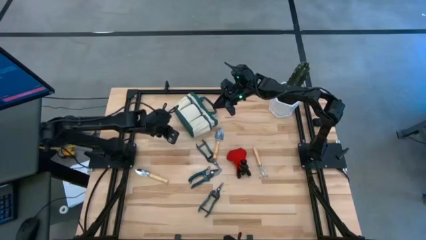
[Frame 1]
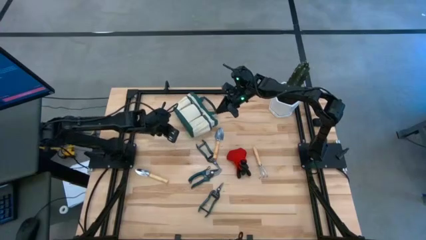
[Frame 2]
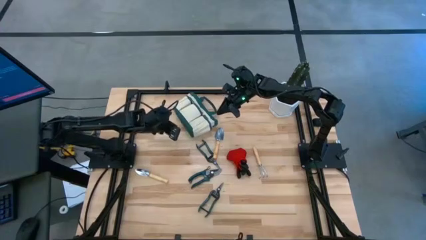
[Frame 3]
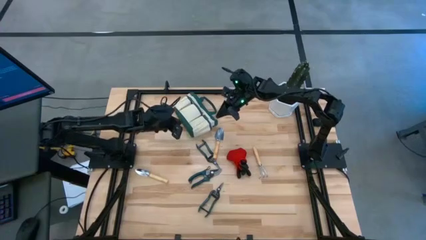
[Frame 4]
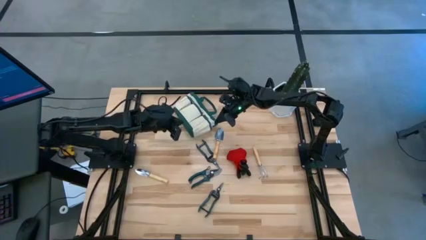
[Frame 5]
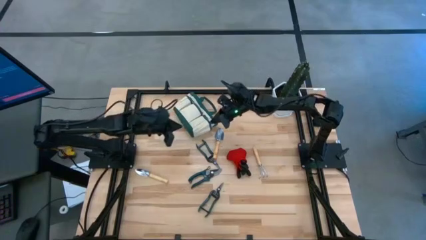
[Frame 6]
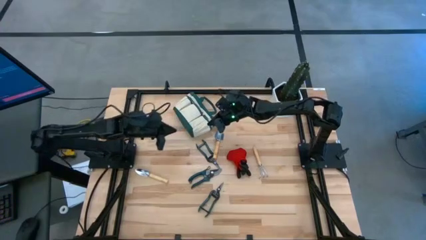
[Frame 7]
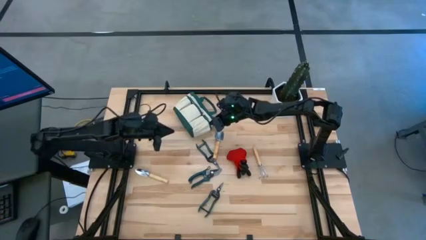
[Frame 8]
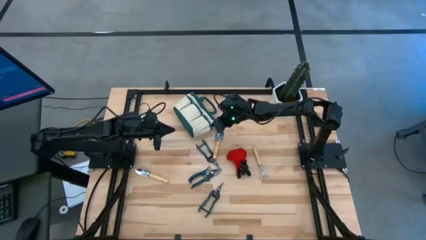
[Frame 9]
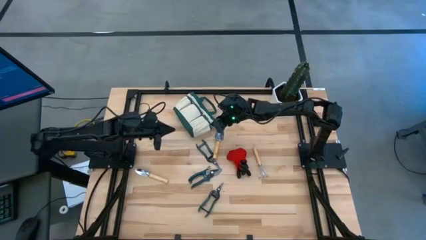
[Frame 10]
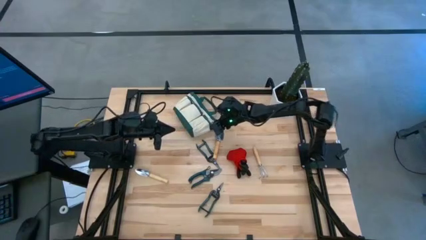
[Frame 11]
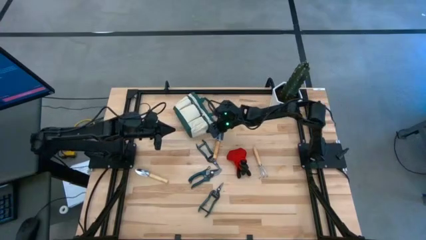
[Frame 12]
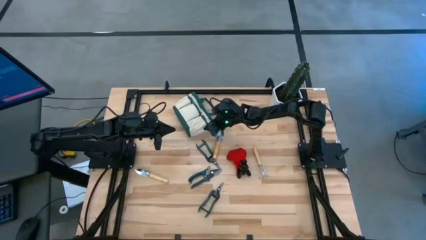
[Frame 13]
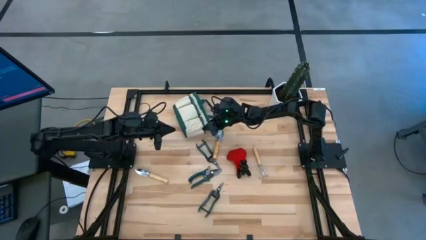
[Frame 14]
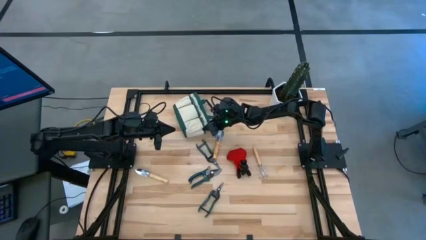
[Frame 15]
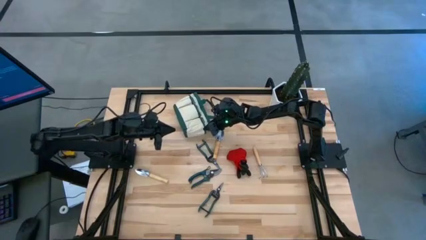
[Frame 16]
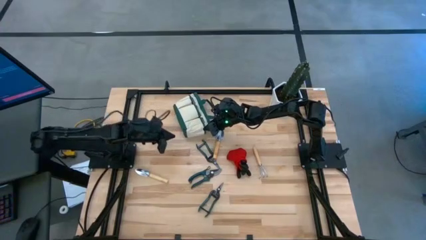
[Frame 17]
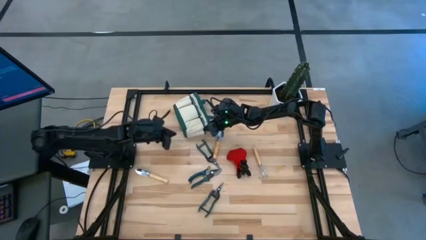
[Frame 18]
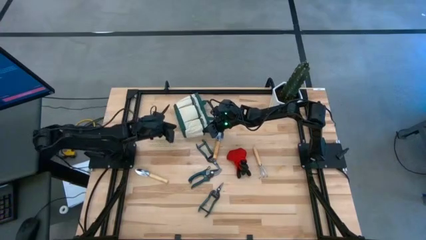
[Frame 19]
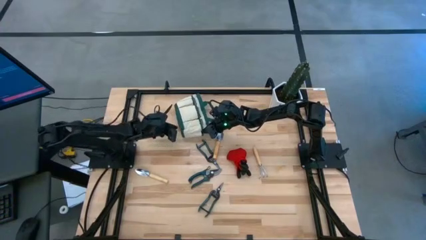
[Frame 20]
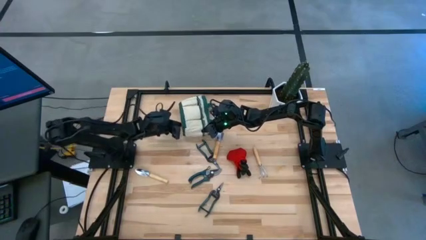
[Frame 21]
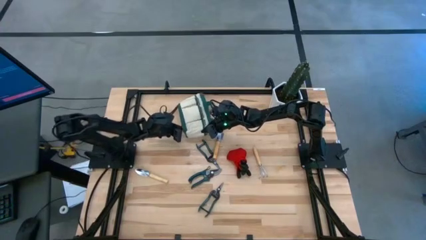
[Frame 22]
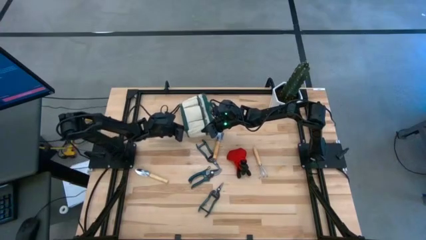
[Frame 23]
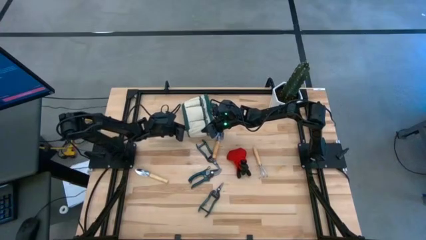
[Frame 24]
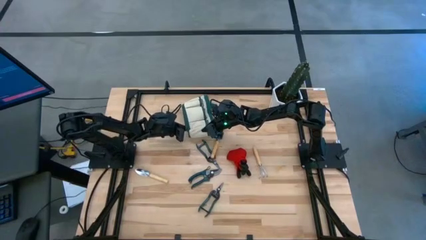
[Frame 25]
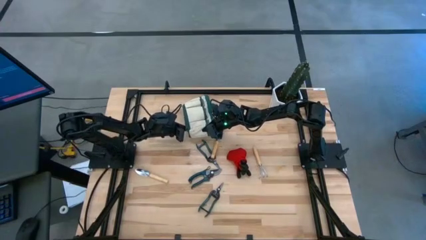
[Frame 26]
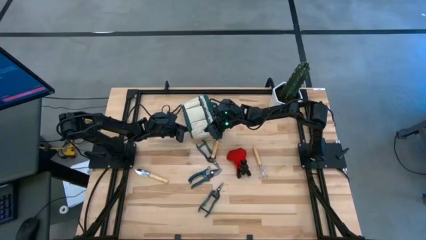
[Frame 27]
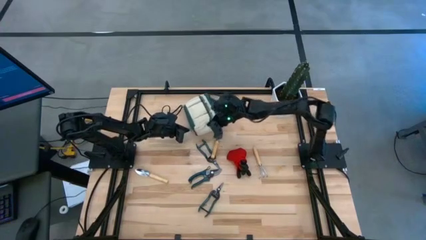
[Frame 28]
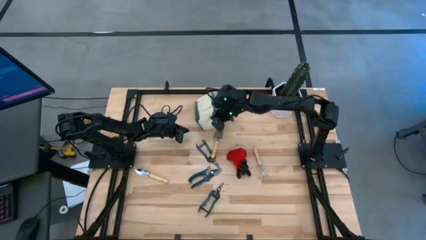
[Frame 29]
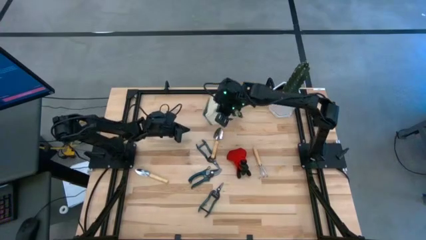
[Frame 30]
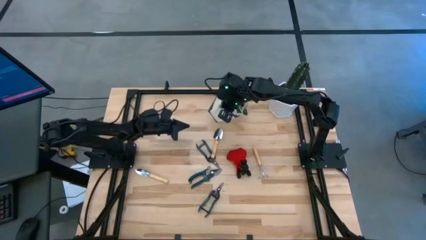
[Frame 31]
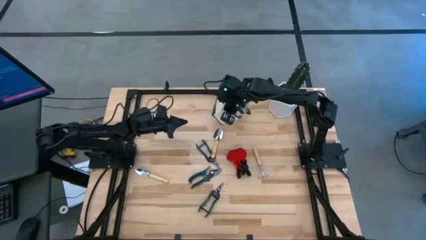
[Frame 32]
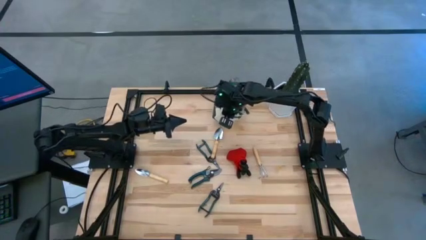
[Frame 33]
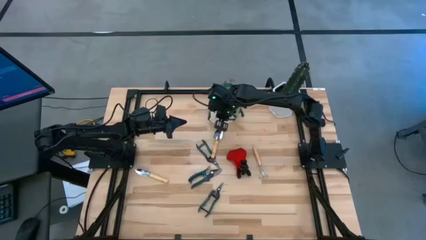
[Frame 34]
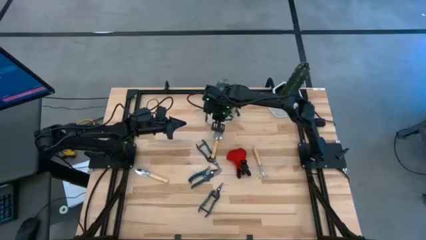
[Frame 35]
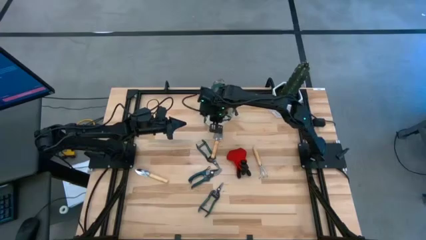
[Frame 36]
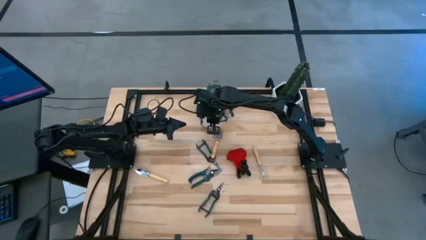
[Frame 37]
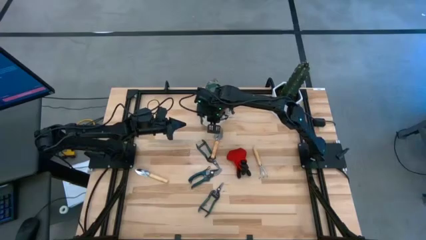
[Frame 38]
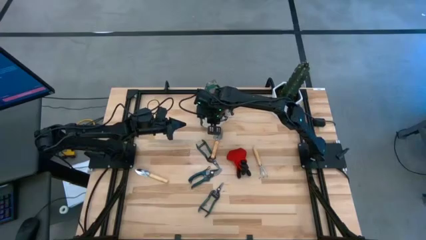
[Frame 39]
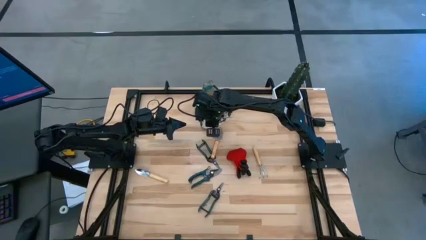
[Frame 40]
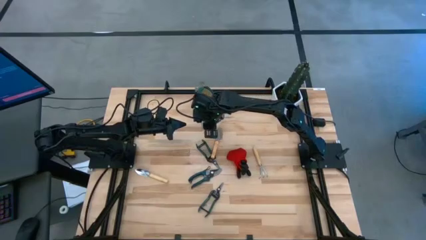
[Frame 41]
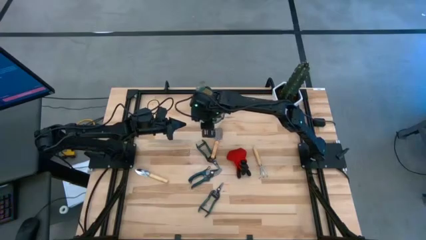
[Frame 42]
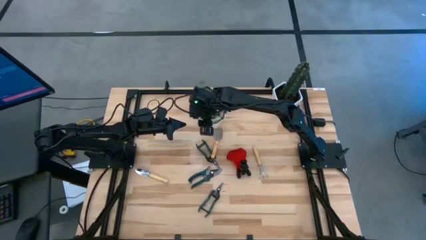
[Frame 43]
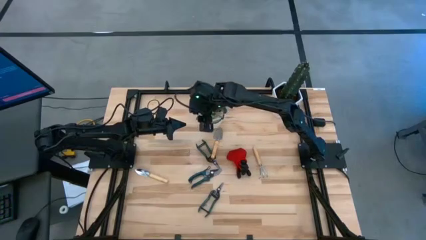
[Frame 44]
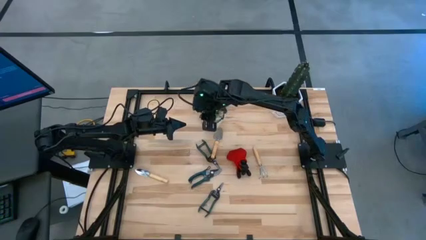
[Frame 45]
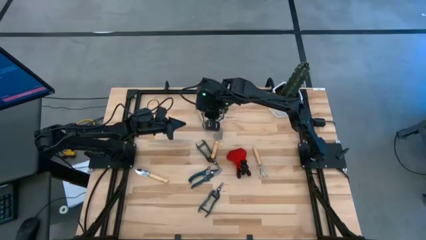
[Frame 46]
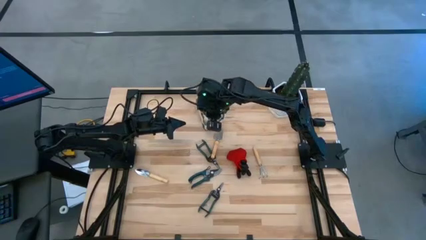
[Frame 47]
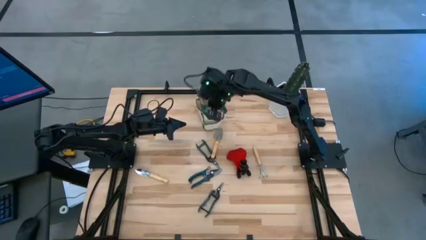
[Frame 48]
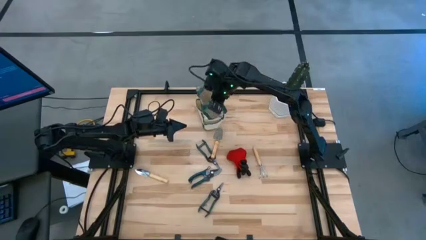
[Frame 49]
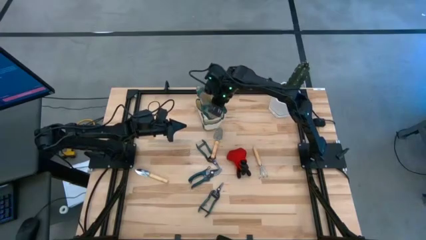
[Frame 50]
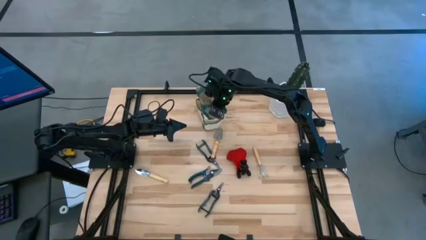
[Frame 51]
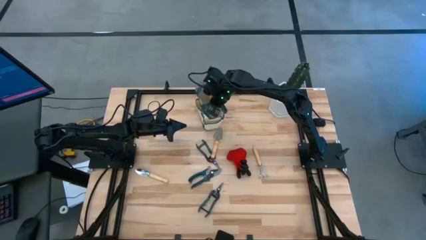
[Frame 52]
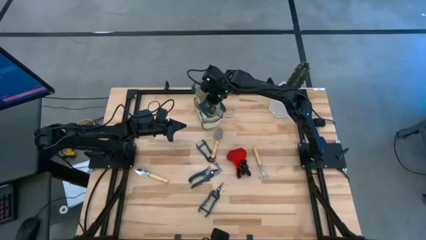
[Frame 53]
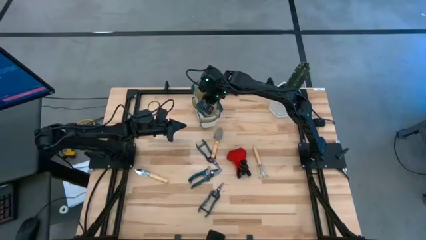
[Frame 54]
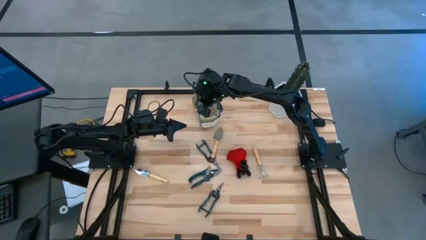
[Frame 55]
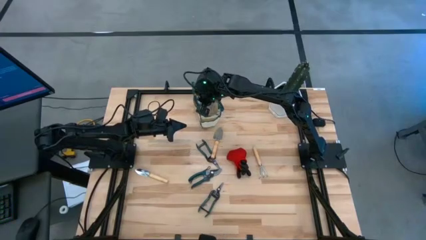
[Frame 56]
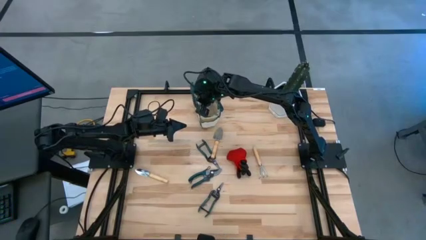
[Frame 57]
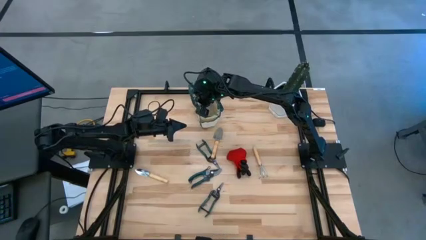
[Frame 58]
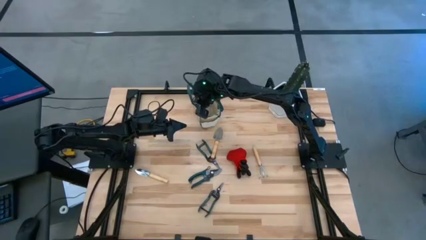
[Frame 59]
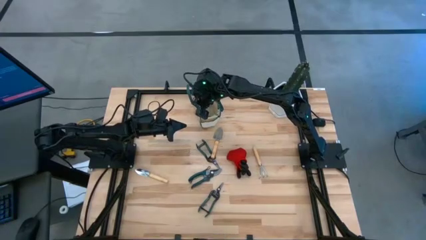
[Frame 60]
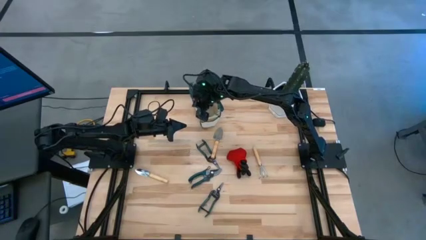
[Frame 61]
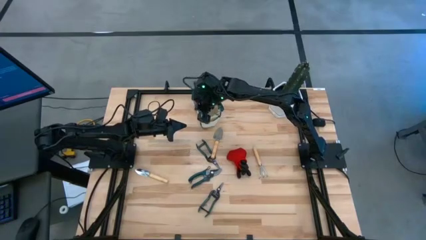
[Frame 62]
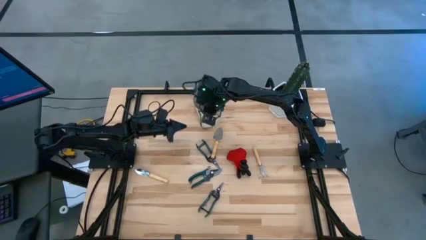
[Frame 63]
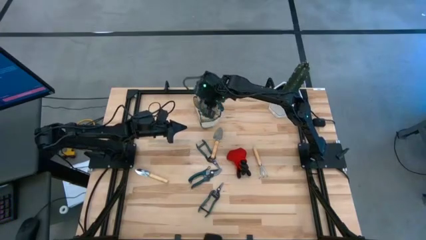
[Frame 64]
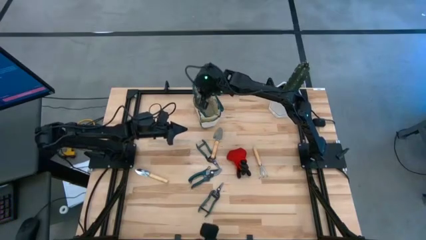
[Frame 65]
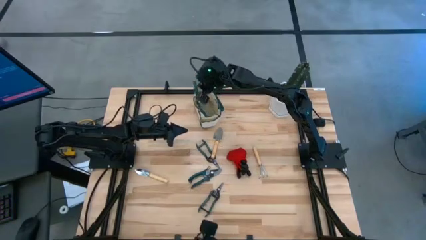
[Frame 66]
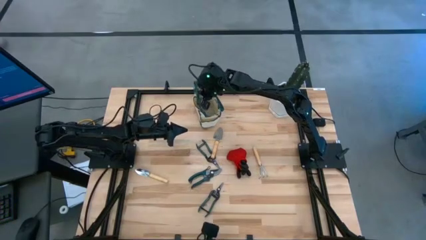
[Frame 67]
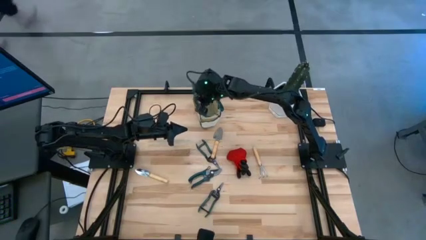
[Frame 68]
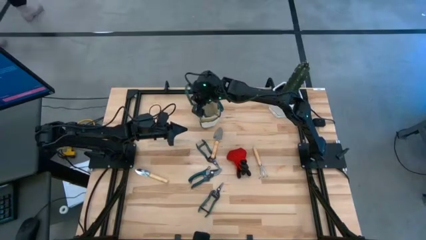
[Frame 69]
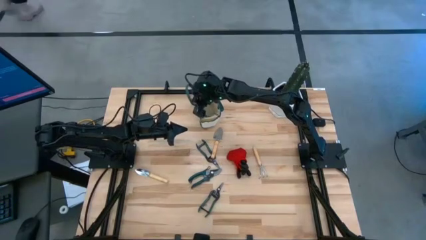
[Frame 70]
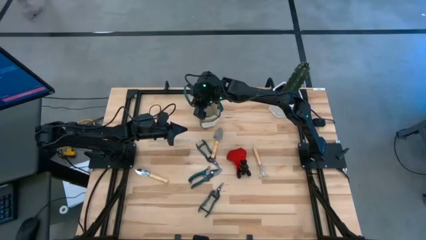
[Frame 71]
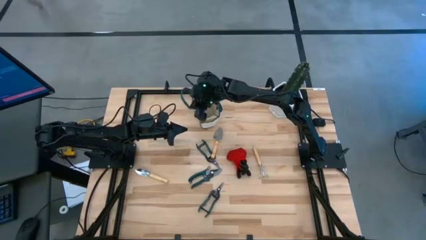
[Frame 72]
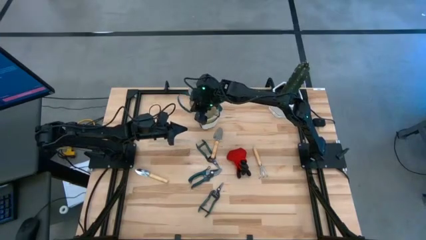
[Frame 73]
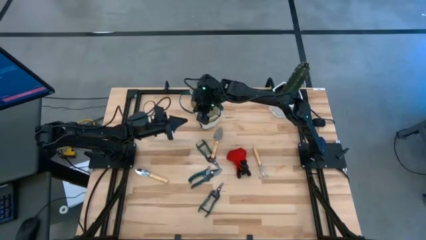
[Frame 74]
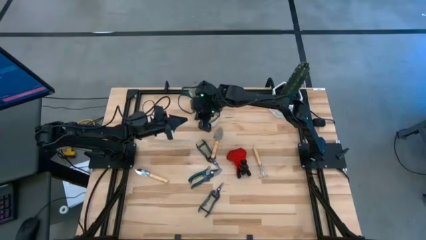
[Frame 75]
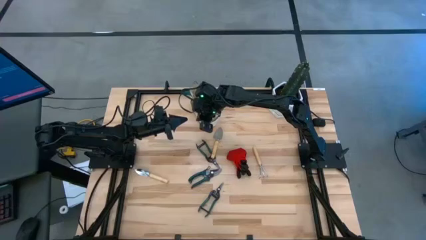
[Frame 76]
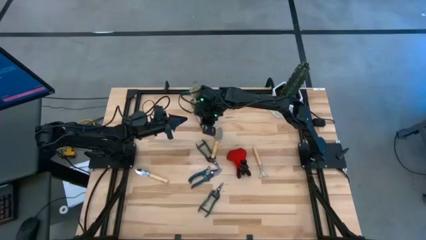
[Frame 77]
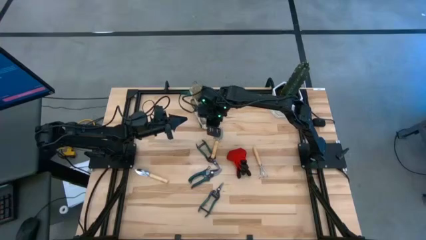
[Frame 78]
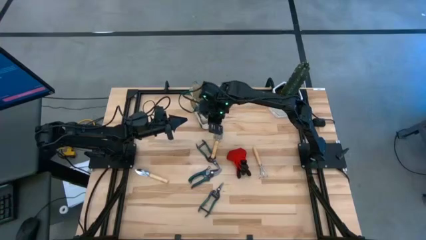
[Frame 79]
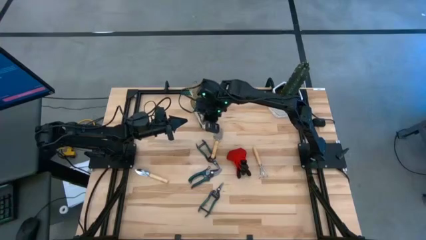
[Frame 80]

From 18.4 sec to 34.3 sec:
Task: Pick & Place Garden tools in Gardening bag
Prepare the brown gardening bag
